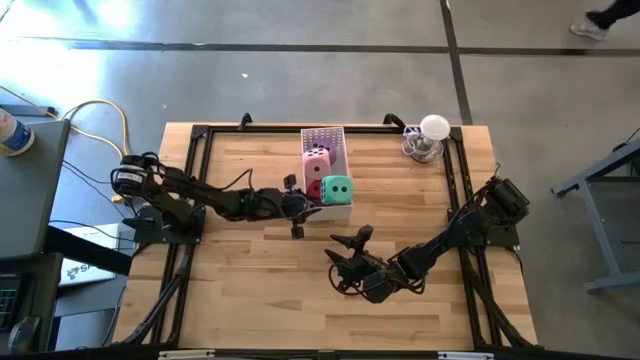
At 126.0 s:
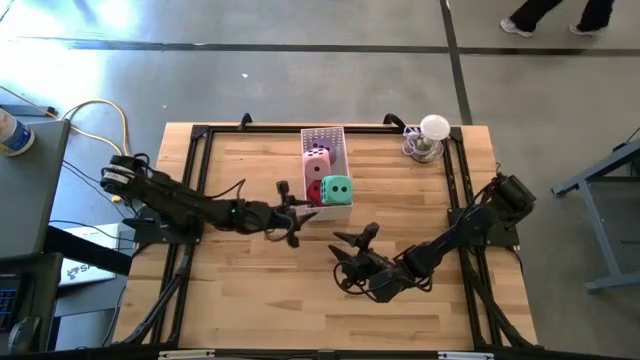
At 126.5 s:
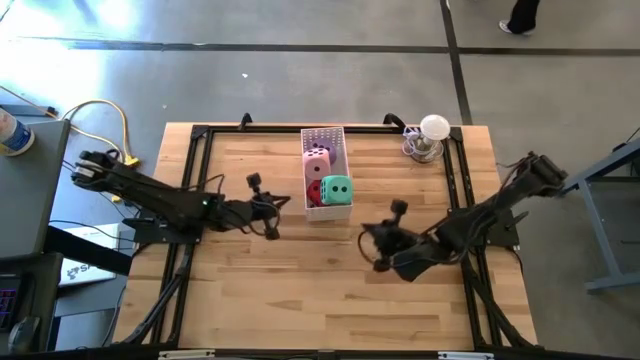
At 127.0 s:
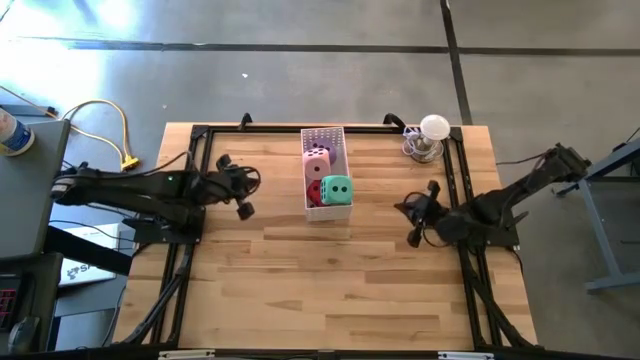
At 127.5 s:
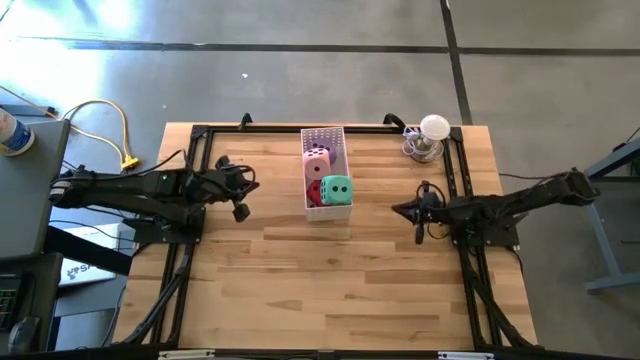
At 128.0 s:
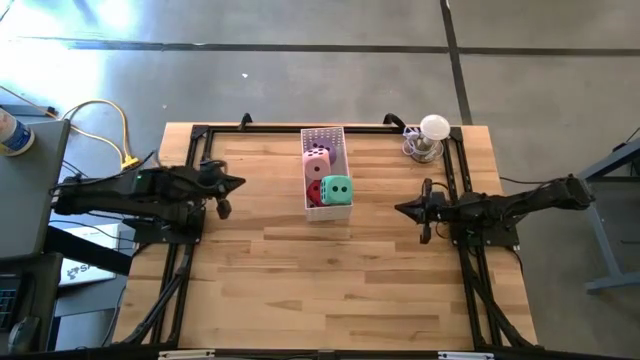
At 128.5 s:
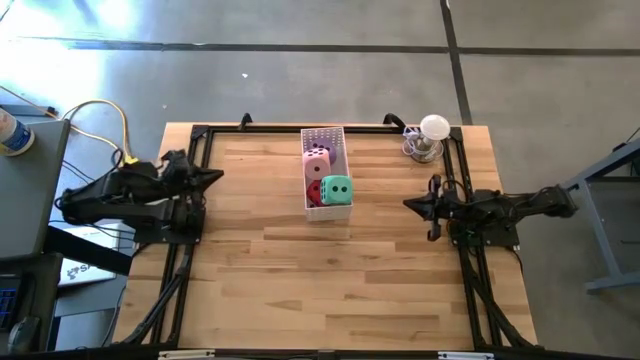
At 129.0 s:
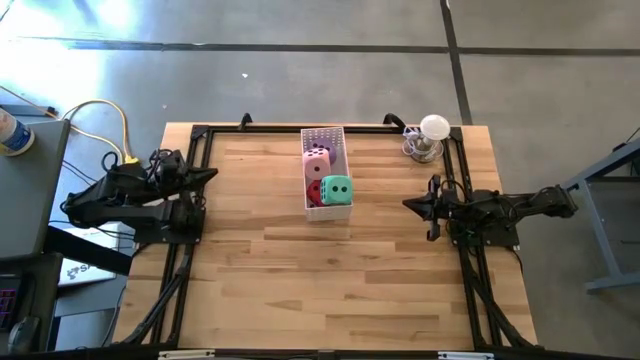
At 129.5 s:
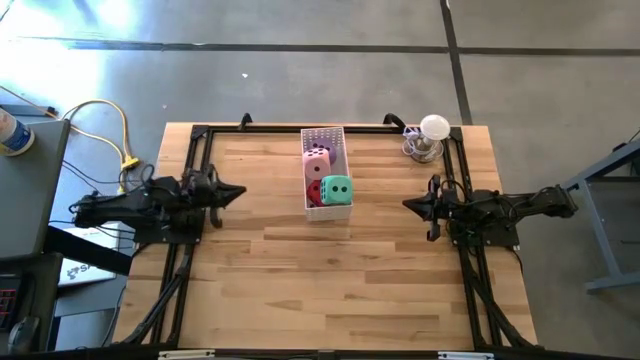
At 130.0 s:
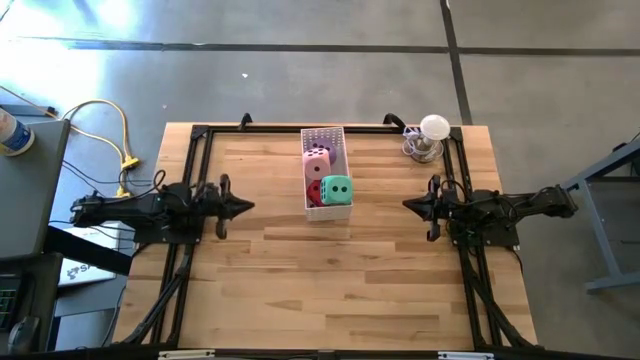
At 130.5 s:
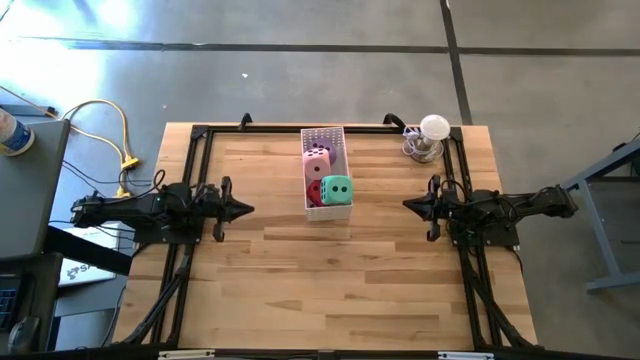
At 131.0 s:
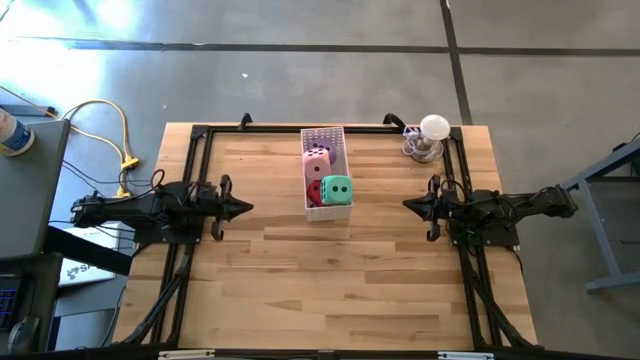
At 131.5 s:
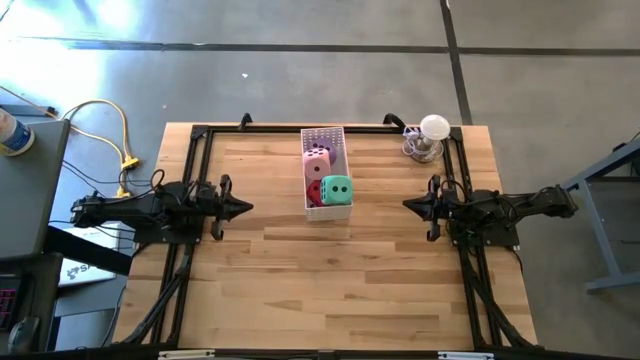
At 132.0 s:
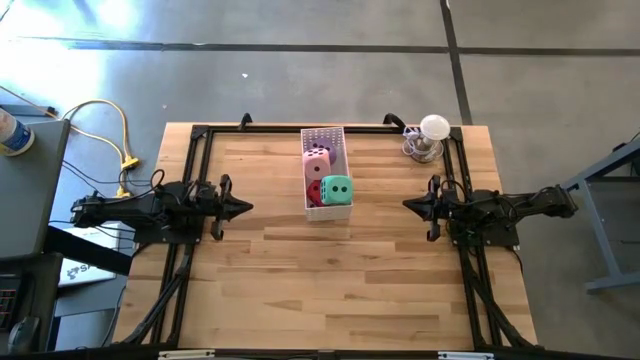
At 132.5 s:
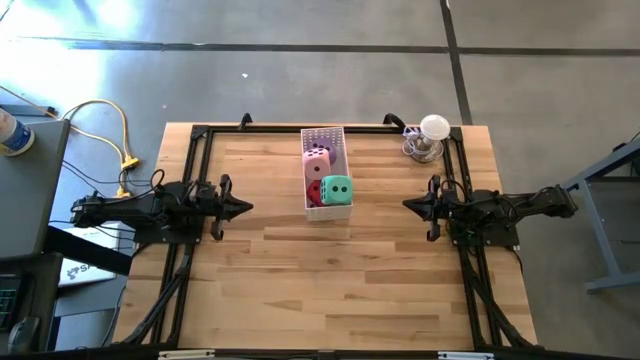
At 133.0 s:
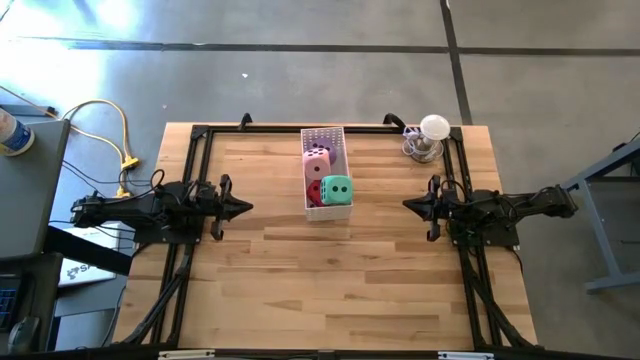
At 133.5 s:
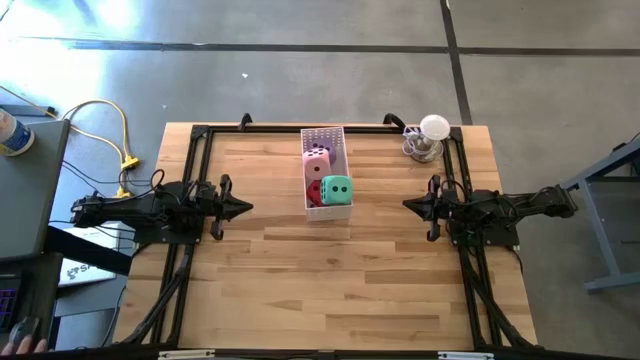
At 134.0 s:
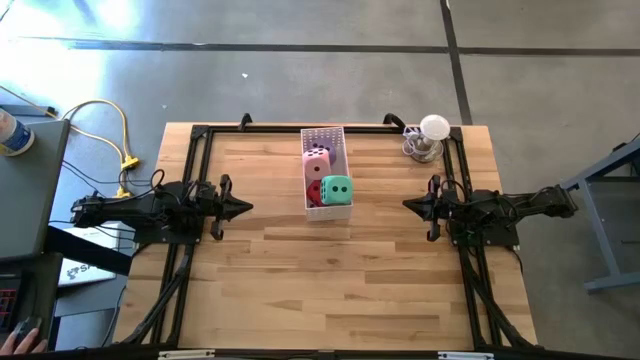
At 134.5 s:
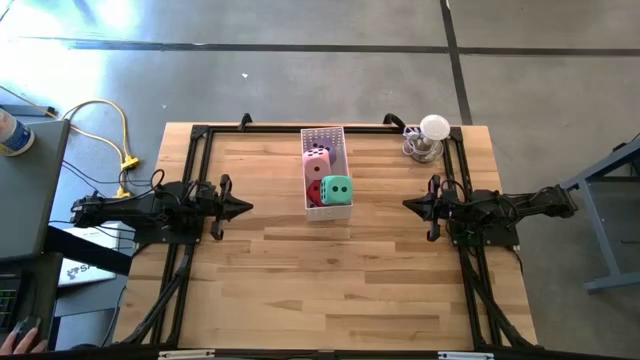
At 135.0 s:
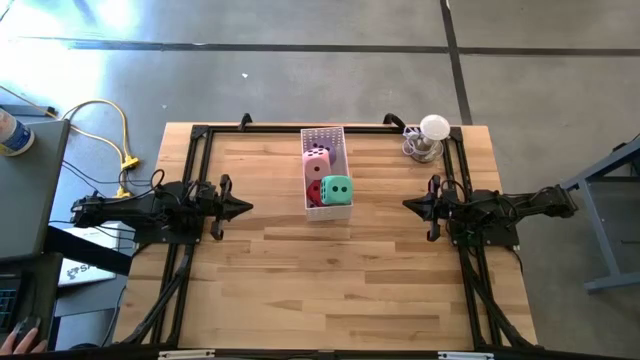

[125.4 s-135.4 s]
Task: Pick & Place Dice
Return to Home Position

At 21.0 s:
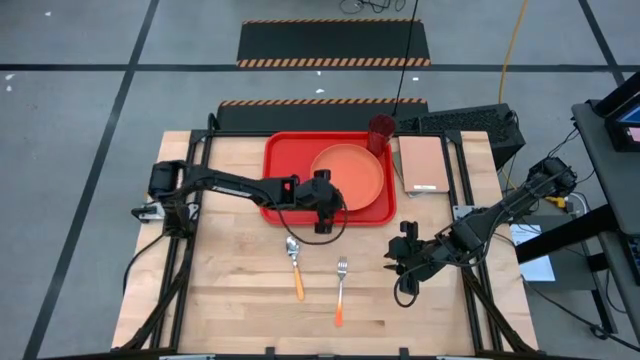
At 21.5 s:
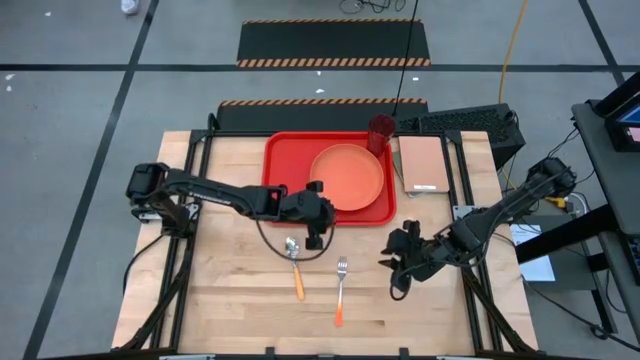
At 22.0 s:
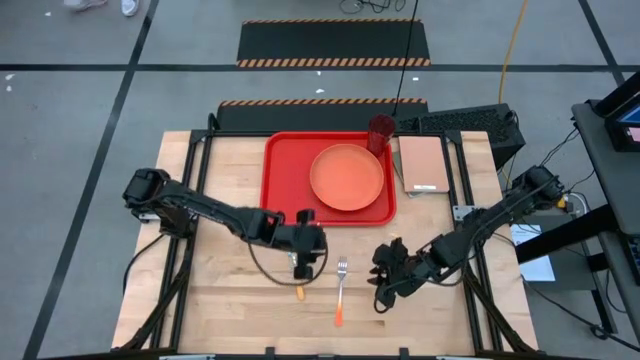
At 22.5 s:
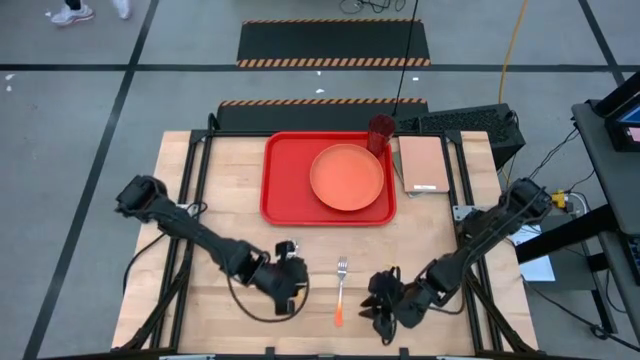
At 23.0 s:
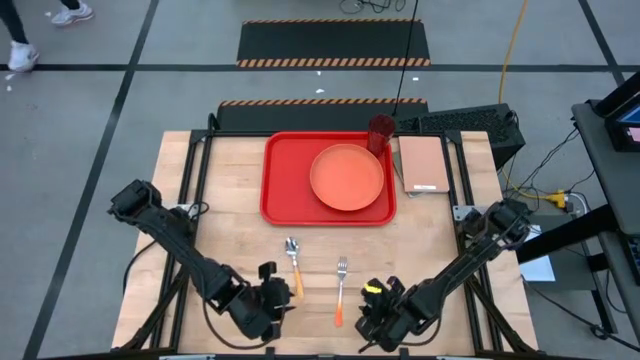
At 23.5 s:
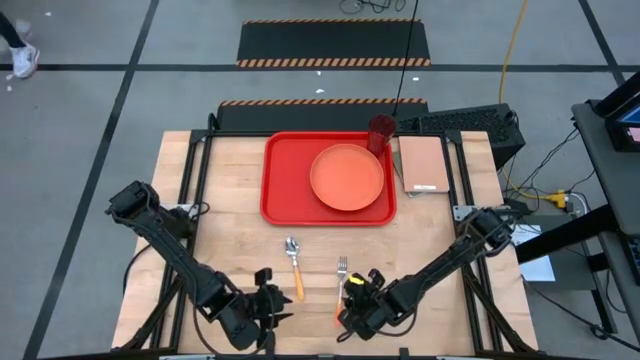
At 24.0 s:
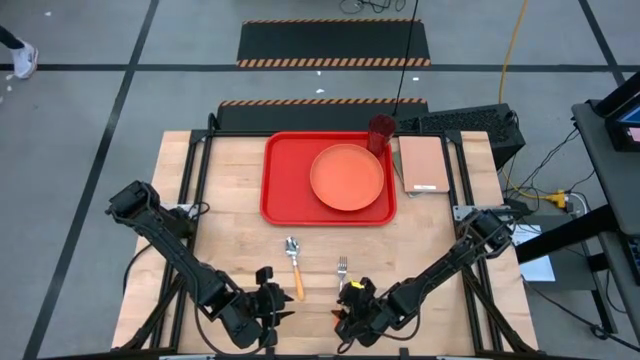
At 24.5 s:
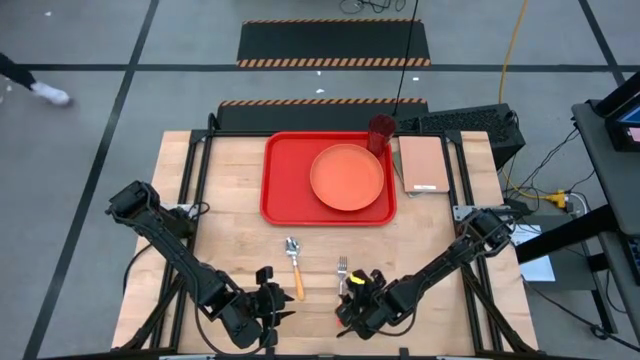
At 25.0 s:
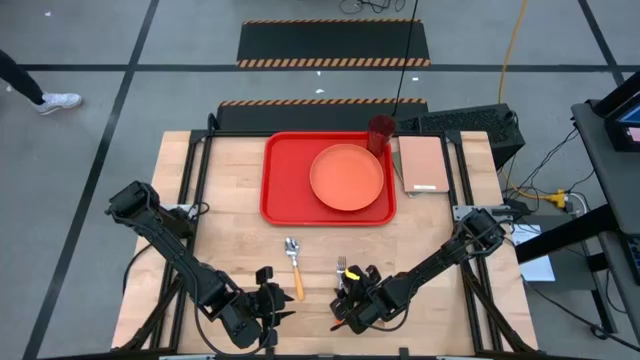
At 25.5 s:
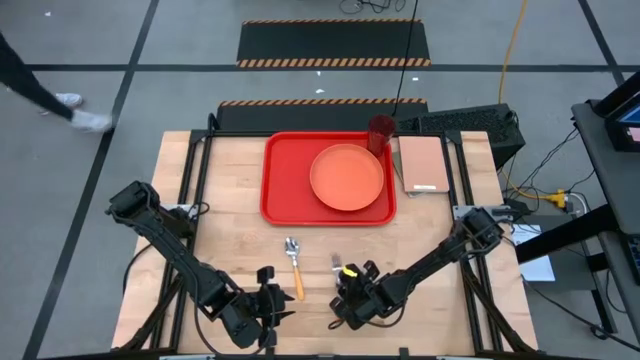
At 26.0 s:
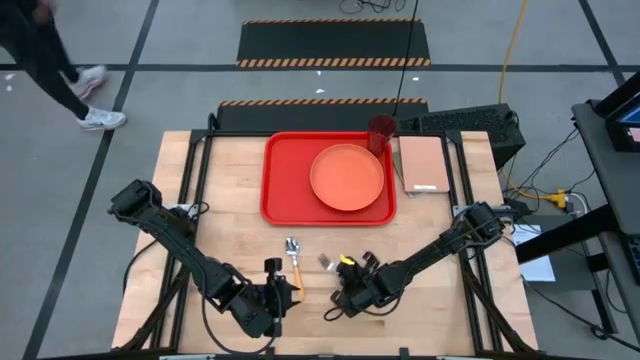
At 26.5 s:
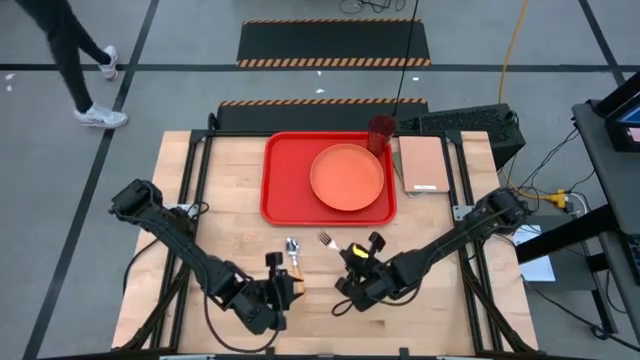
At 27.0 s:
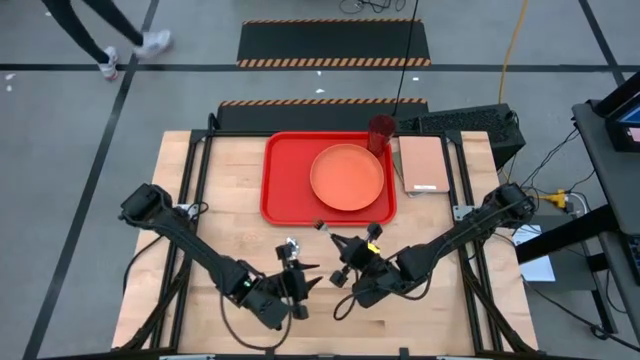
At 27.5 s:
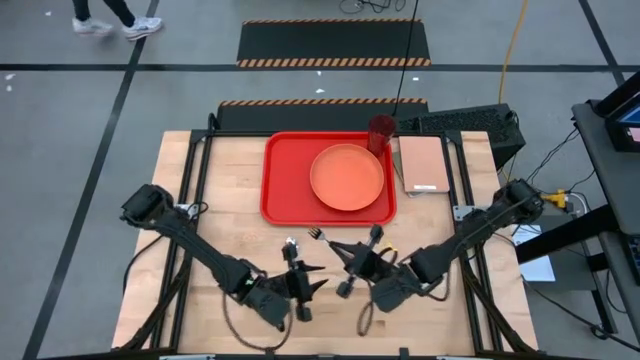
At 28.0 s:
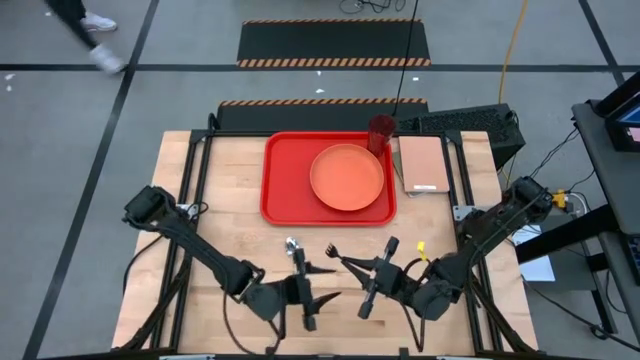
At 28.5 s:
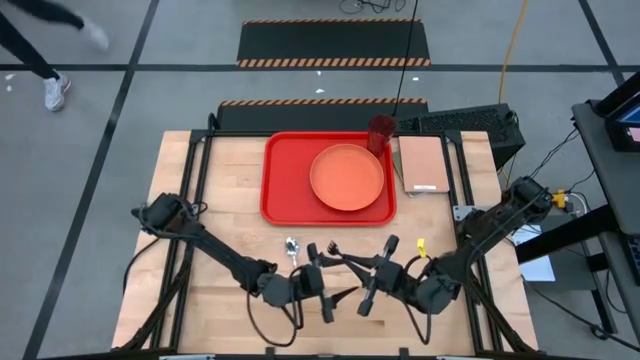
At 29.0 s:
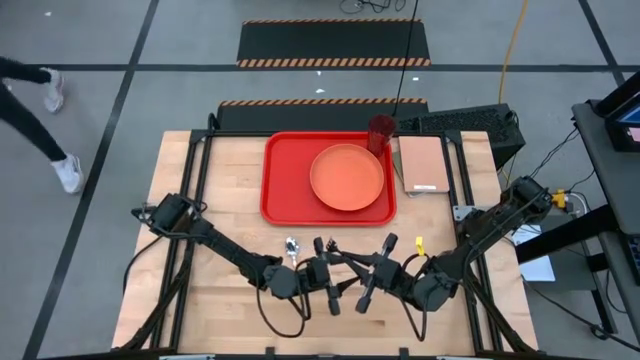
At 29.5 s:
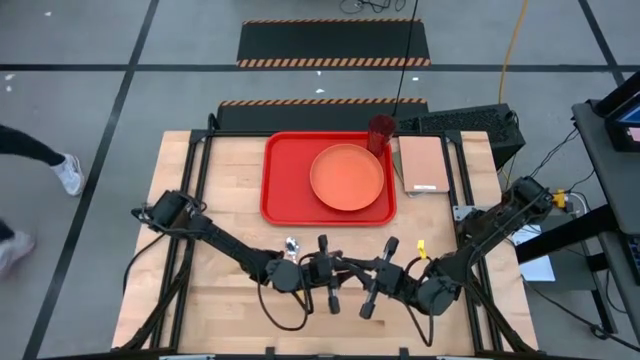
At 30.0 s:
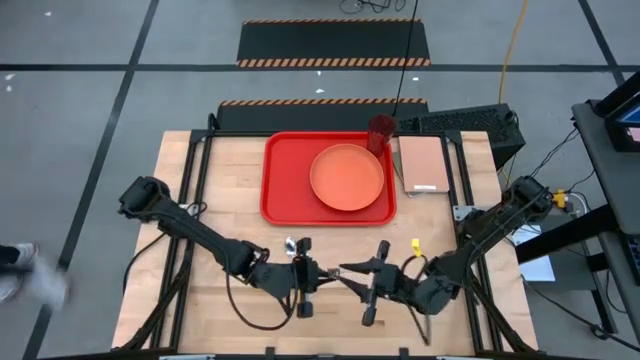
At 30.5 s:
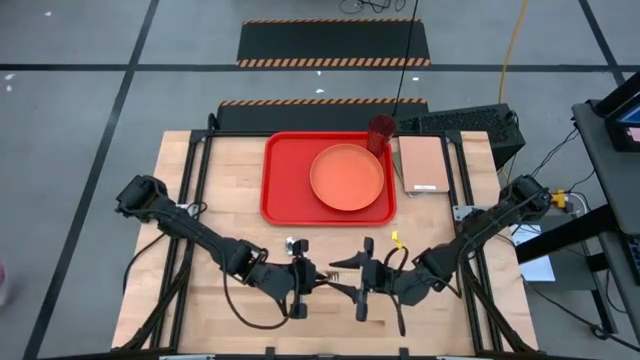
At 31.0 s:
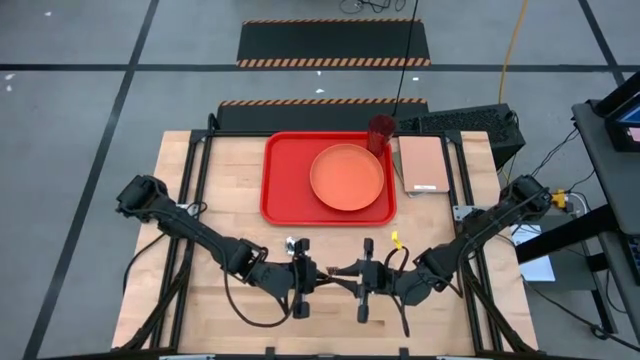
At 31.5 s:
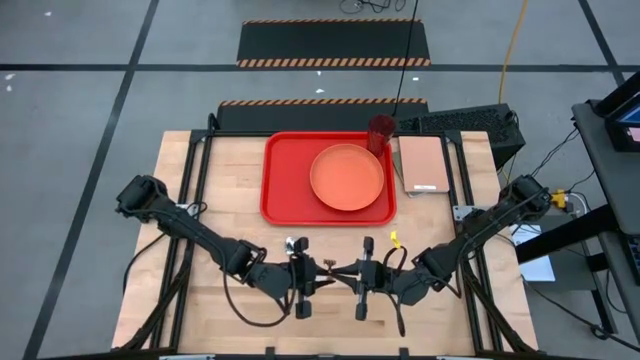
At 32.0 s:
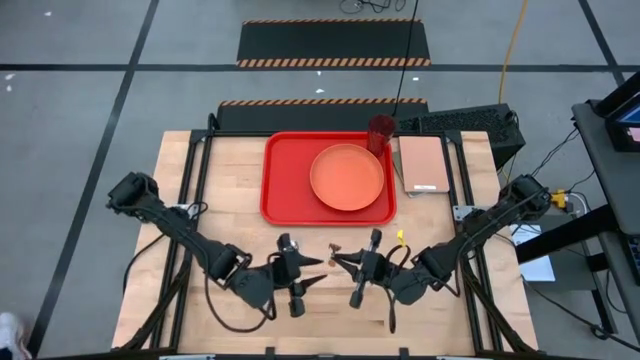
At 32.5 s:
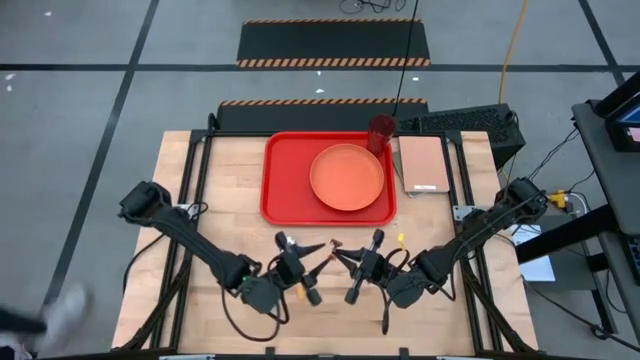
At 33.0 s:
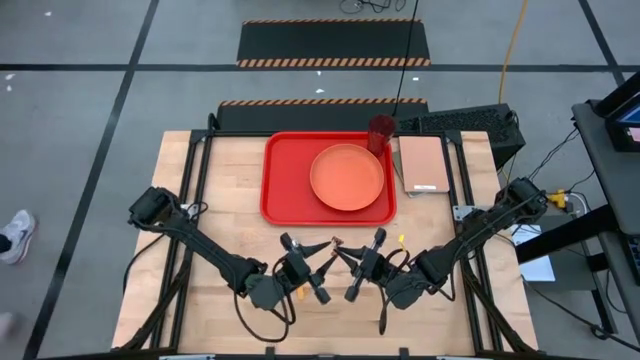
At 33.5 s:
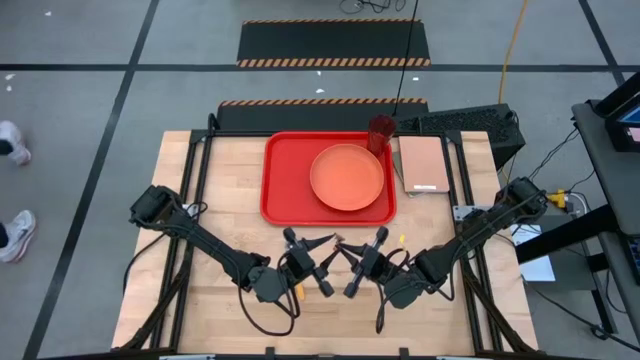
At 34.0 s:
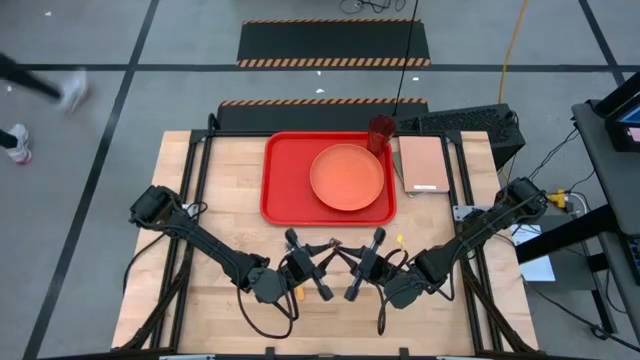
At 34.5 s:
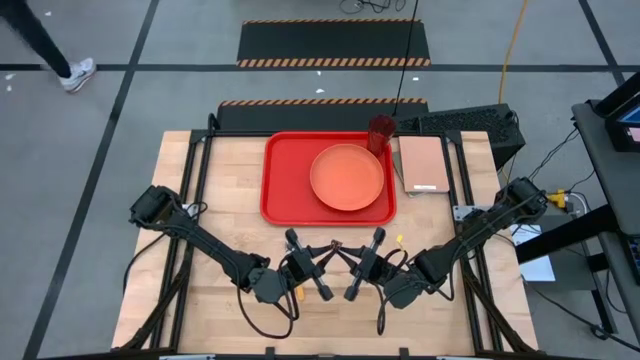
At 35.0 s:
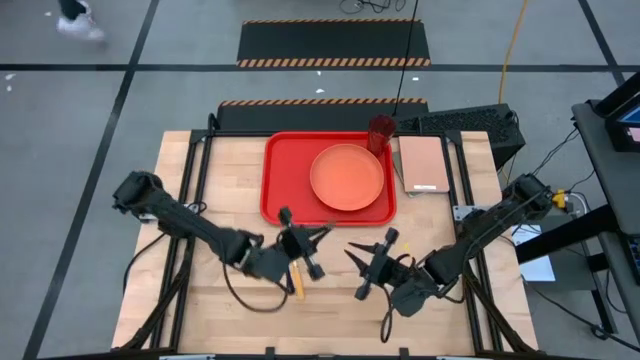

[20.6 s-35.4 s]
Task: Pick and place plate/cup/fork/spoon on tray
Put the orange fork to the left side of the orange plate on the red serving tray
